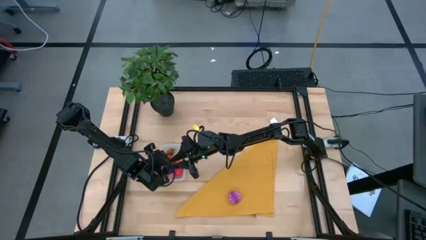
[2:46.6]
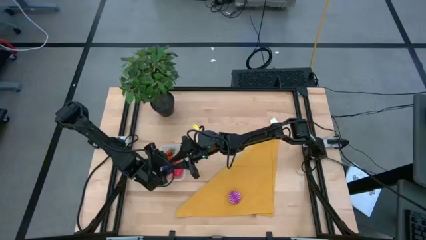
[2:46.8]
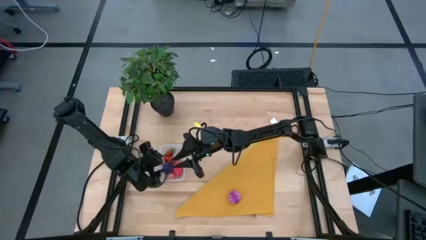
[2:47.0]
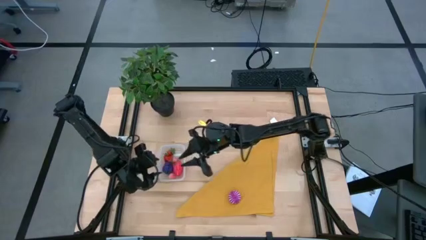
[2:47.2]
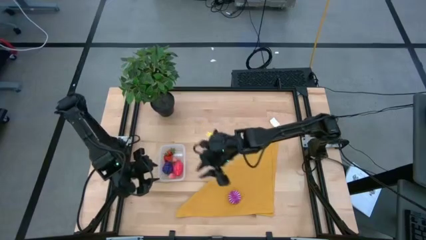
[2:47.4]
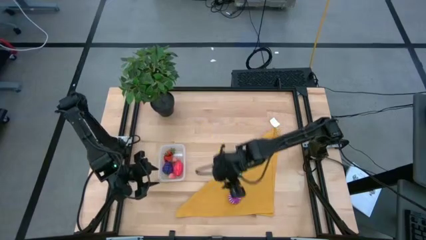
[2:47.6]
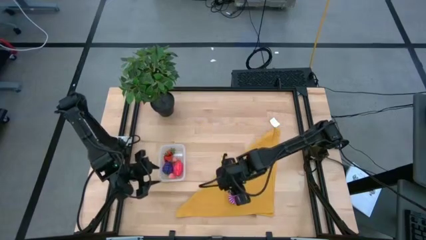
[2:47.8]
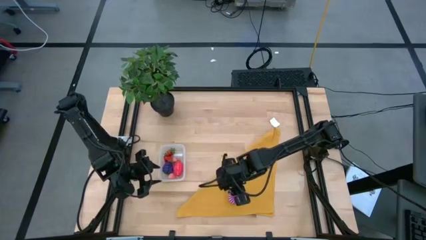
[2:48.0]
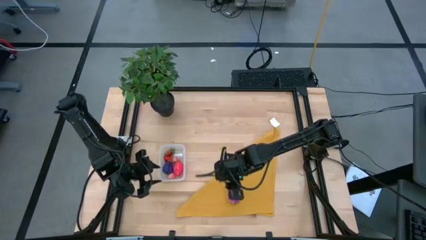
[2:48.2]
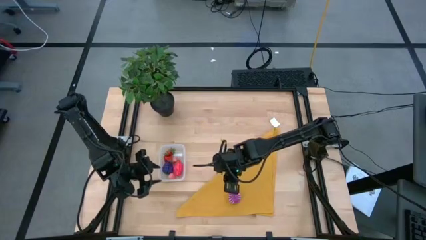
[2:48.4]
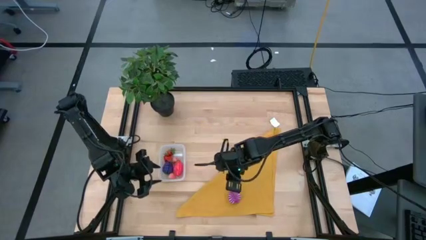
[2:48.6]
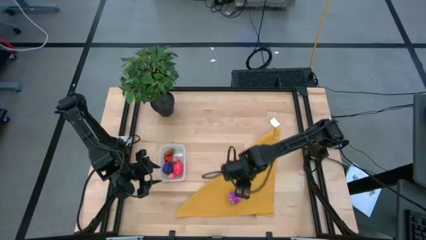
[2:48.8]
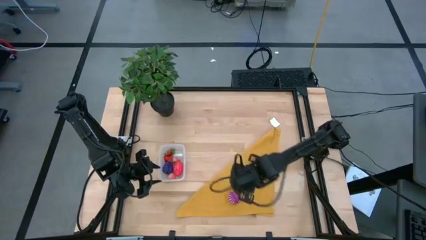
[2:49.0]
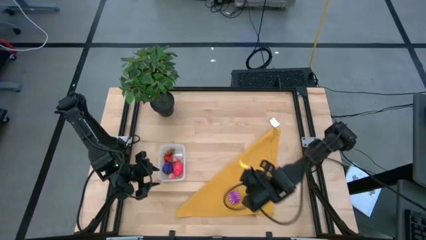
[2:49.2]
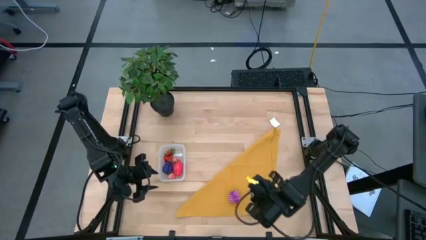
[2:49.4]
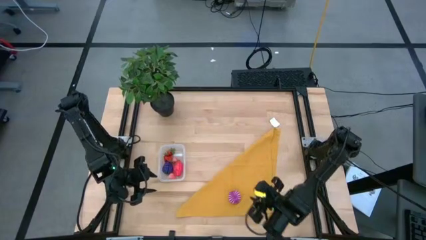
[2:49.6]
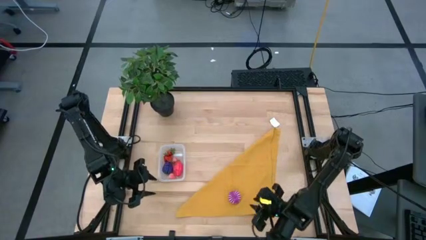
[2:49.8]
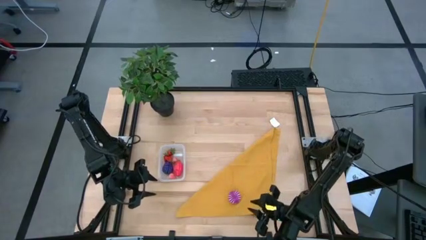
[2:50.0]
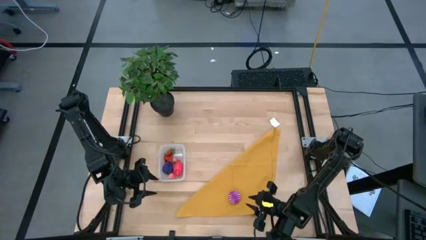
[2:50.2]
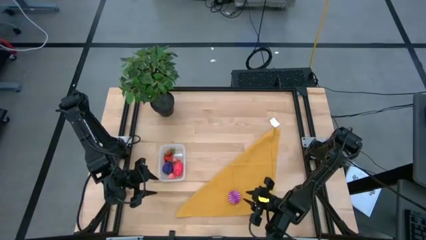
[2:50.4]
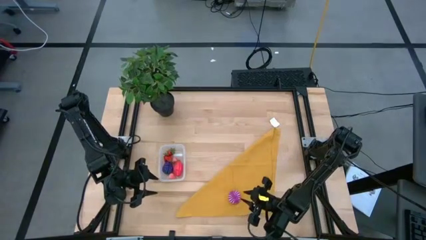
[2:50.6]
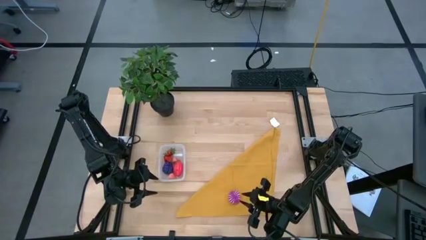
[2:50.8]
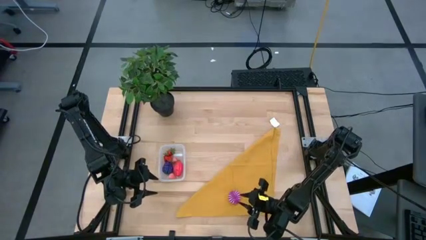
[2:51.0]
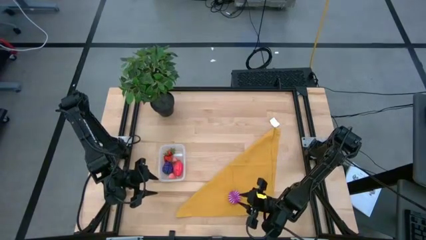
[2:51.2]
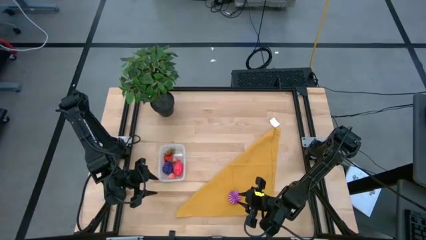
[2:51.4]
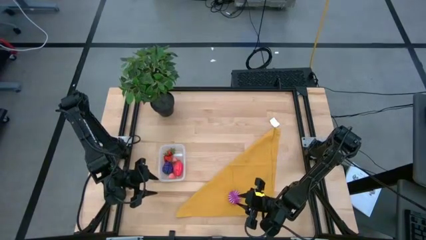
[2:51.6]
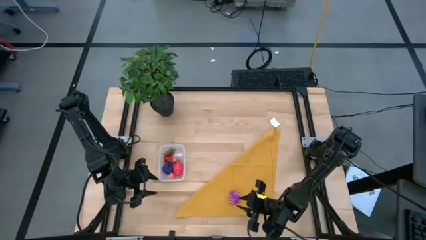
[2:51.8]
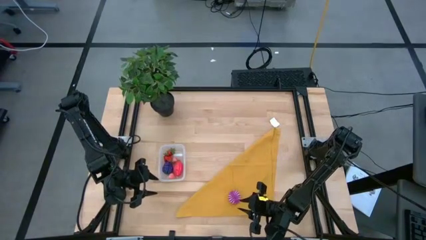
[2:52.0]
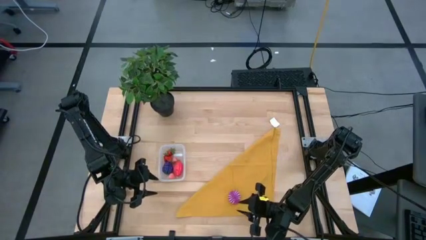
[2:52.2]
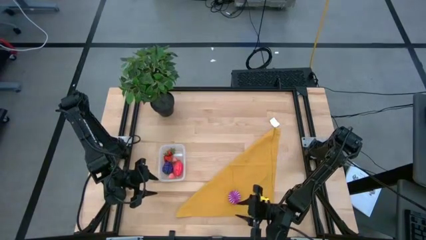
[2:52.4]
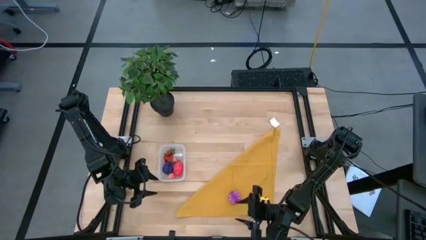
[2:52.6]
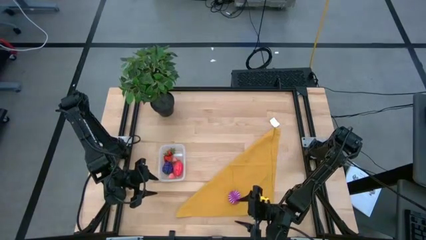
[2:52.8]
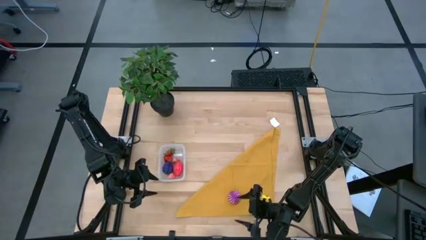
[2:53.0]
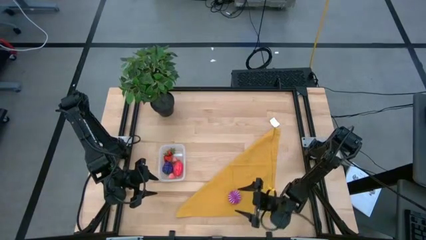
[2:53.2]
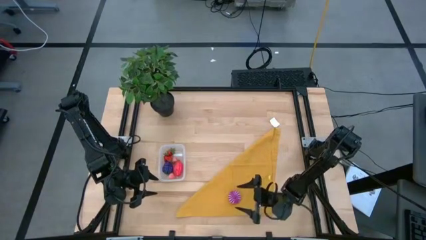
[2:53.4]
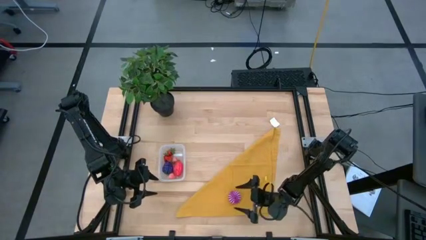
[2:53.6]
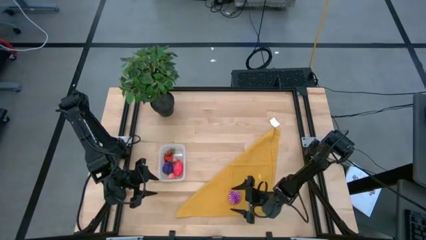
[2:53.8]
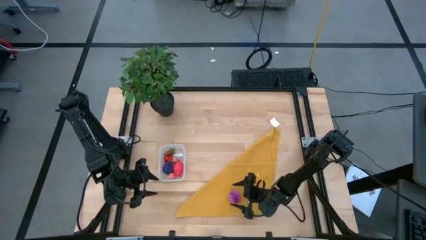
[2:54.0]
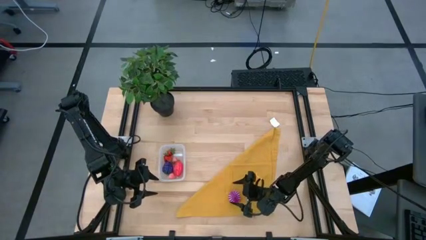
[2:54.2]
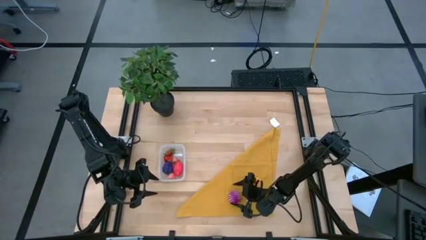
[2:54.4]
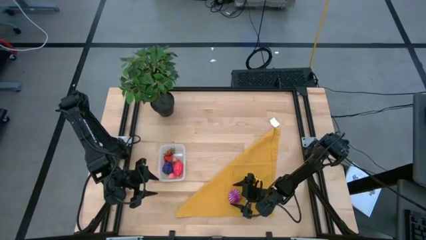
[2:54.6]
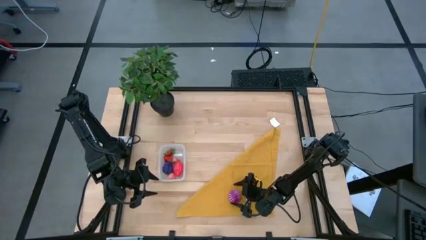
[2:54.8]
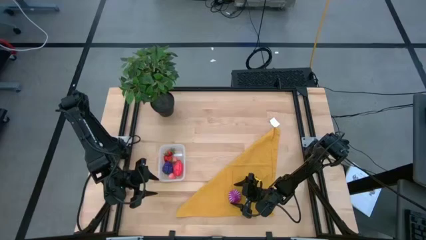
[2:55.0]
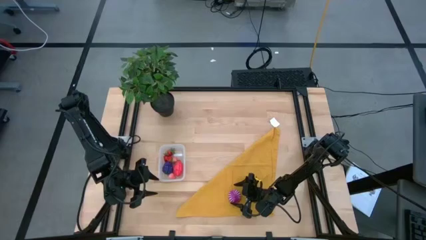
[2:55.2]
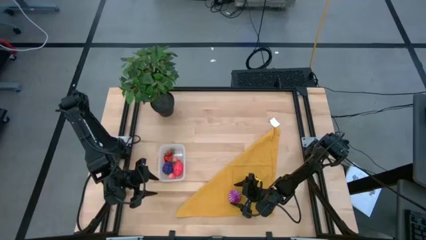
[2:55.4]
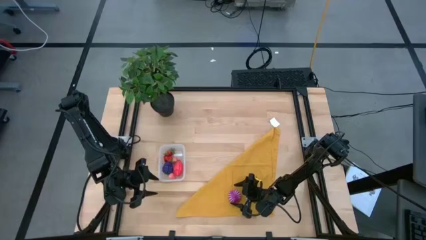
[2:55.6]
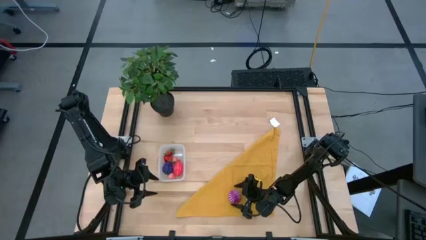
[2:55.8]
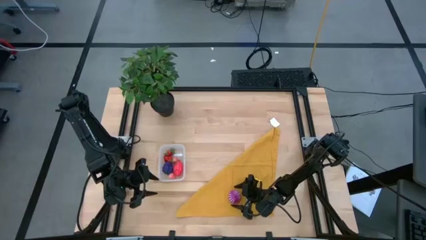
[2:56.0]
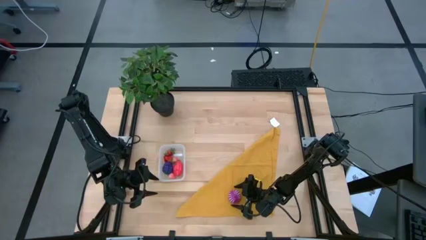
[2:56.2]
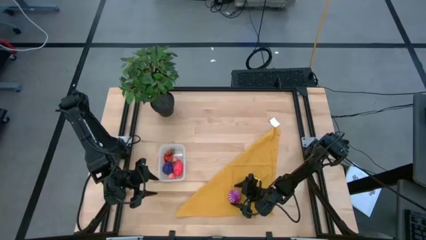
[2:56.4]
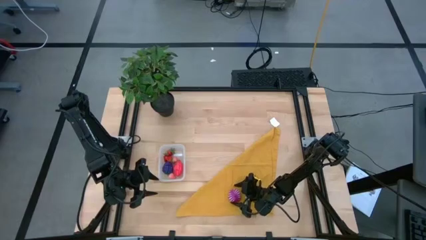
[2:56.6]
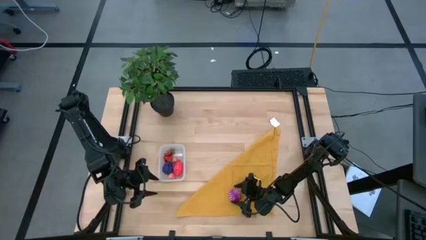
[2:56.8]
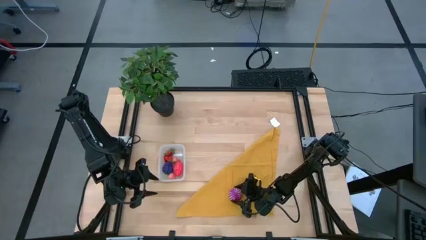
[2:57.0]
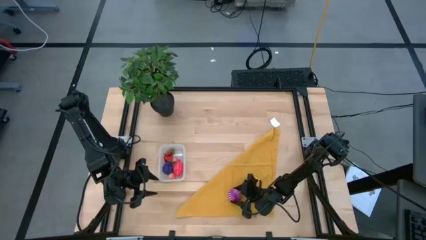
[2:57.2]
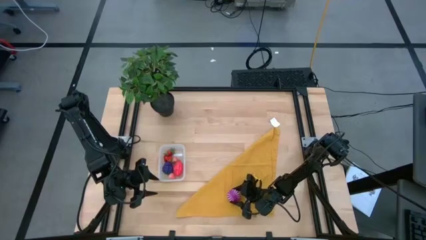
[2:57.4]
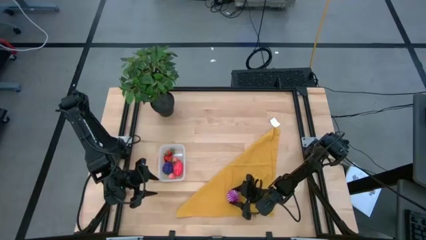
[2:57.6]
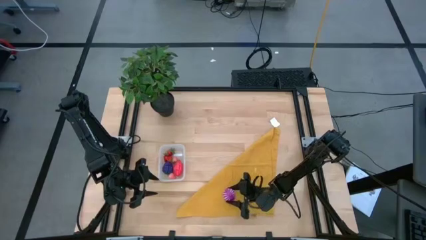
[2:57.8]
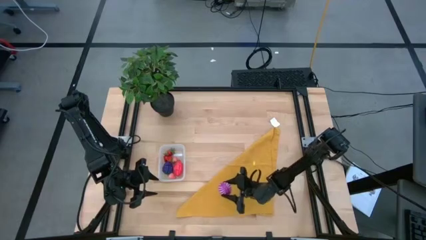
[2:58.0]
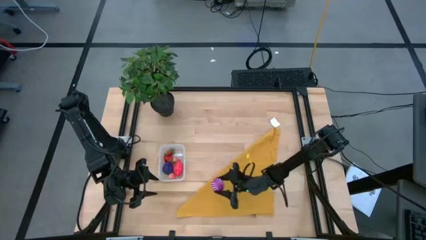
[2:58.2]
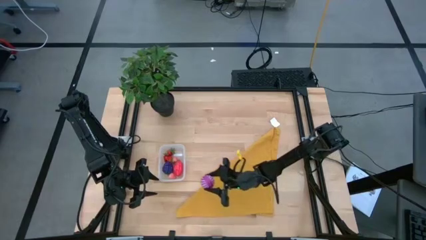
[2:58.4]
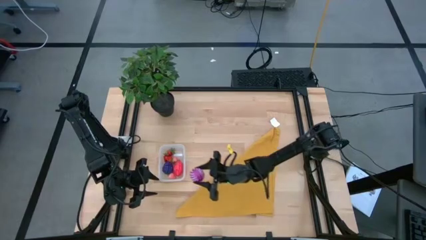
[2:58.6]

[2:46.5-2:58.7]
Task: Pick and placing Produce into tupperware
Put the purple onion into the transparent bin
